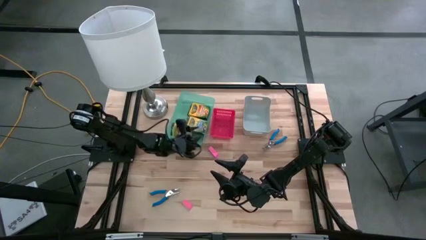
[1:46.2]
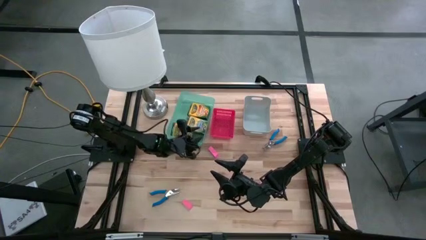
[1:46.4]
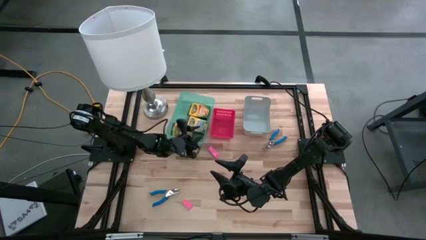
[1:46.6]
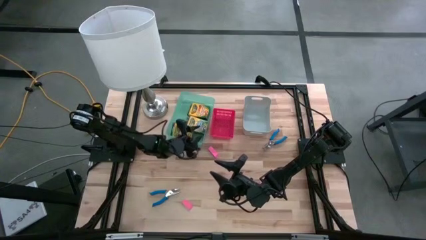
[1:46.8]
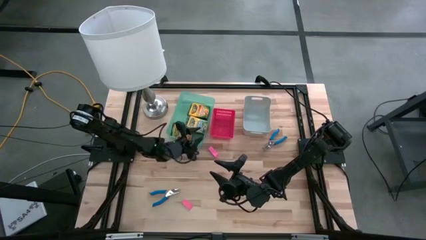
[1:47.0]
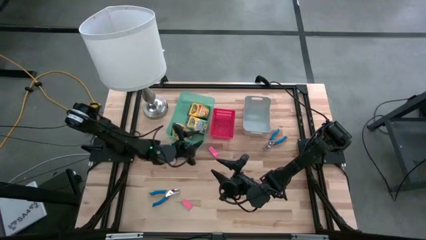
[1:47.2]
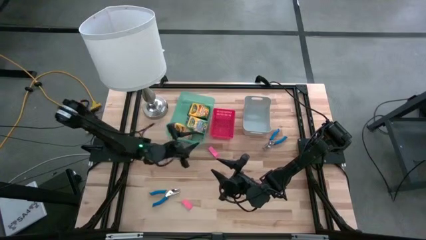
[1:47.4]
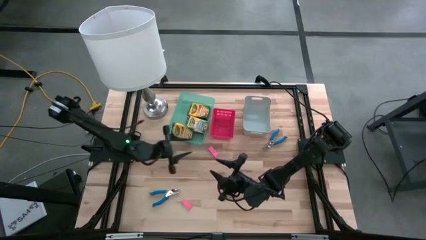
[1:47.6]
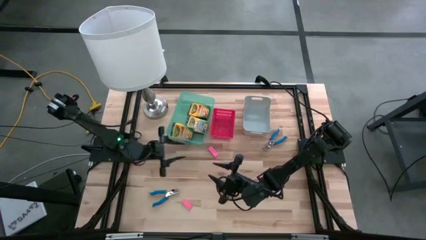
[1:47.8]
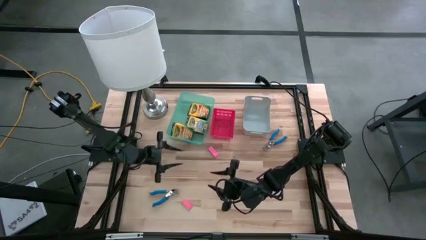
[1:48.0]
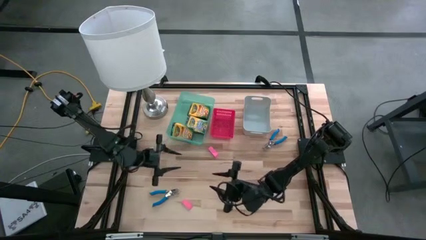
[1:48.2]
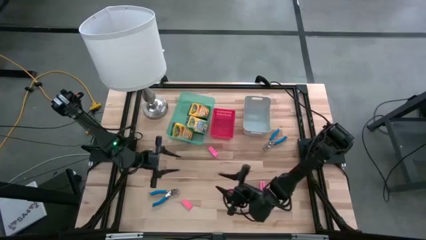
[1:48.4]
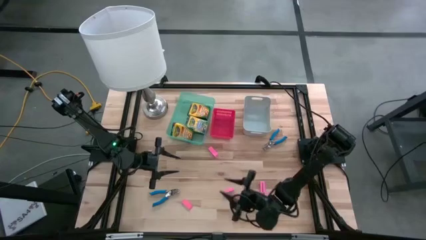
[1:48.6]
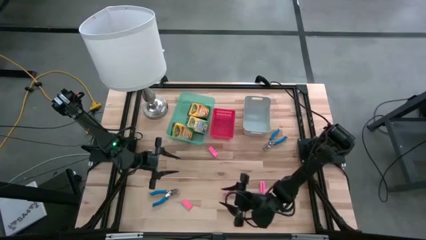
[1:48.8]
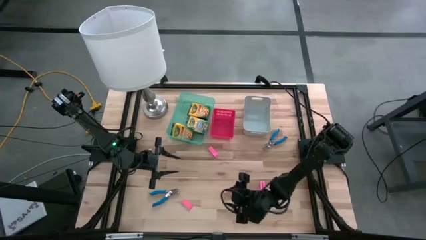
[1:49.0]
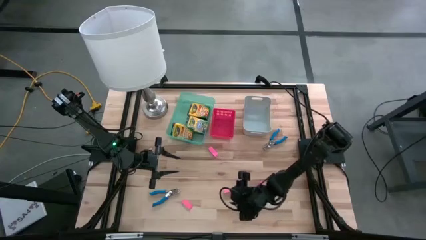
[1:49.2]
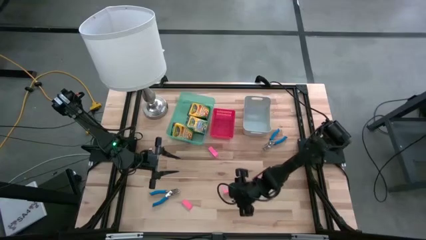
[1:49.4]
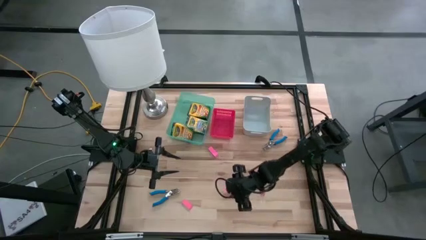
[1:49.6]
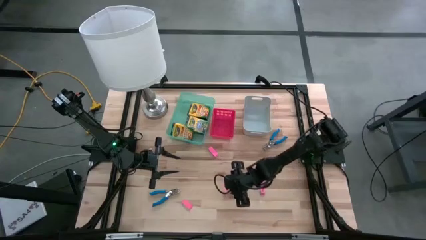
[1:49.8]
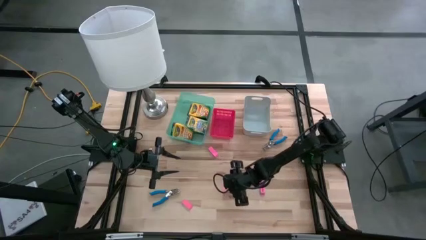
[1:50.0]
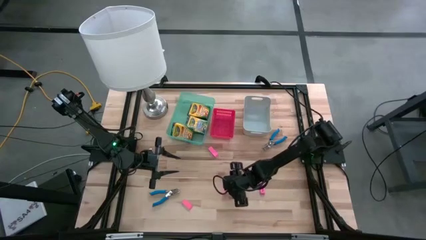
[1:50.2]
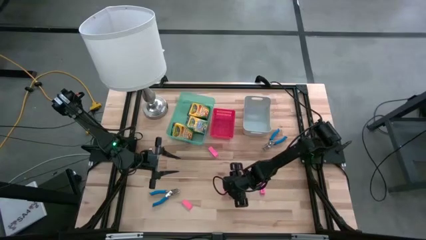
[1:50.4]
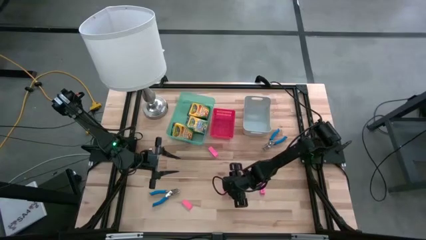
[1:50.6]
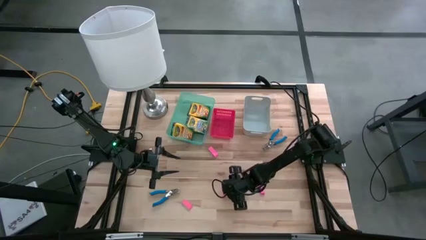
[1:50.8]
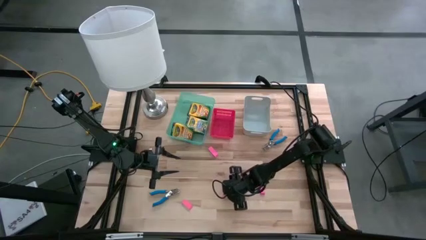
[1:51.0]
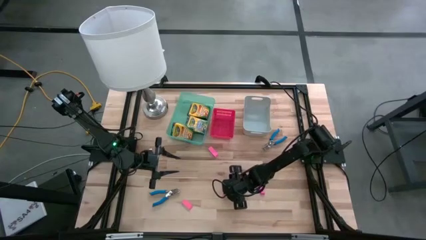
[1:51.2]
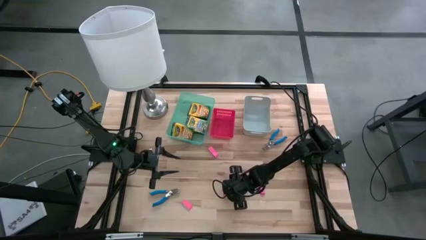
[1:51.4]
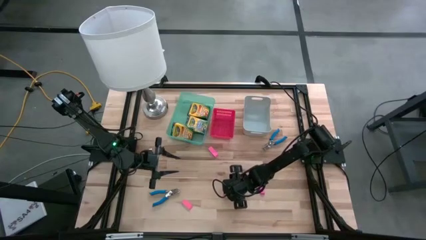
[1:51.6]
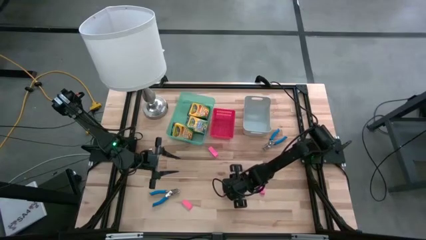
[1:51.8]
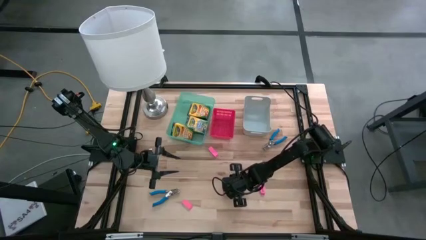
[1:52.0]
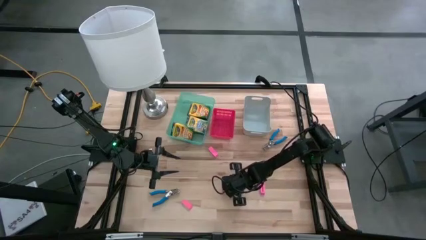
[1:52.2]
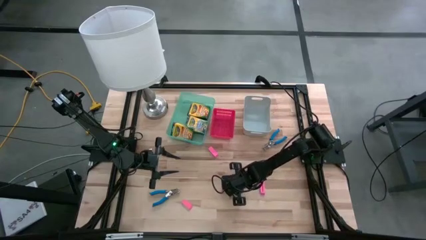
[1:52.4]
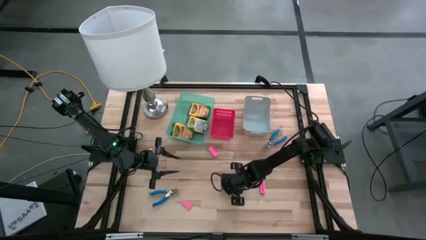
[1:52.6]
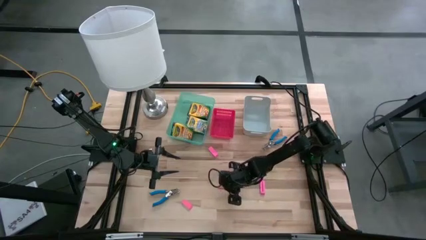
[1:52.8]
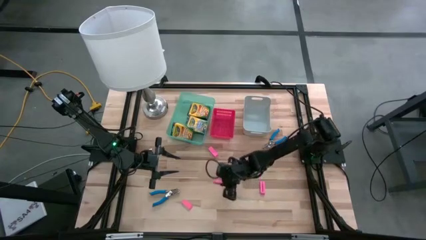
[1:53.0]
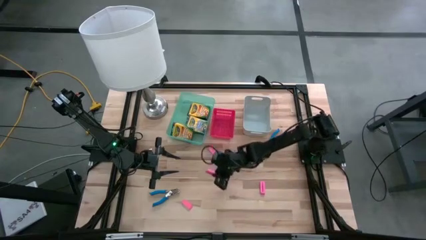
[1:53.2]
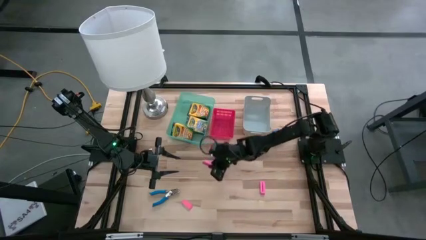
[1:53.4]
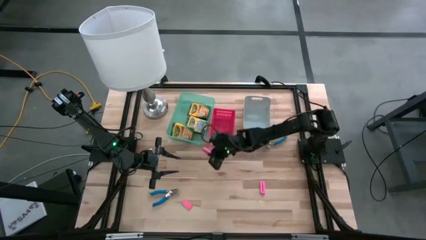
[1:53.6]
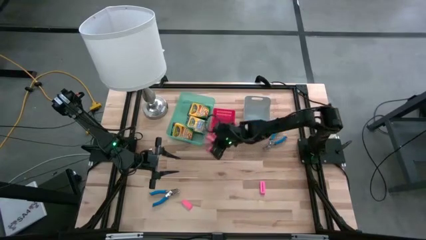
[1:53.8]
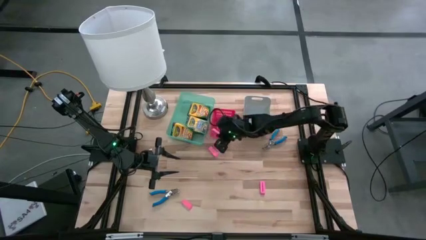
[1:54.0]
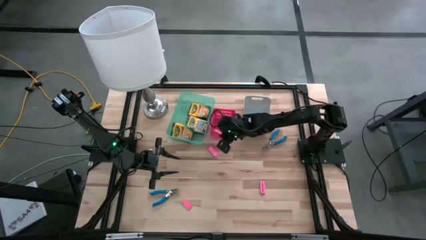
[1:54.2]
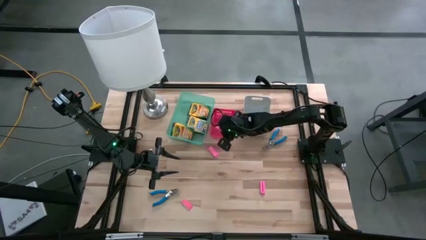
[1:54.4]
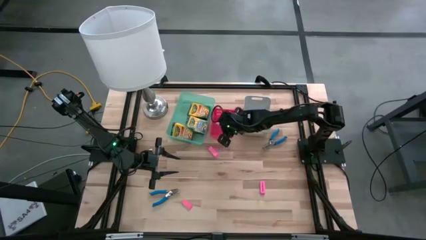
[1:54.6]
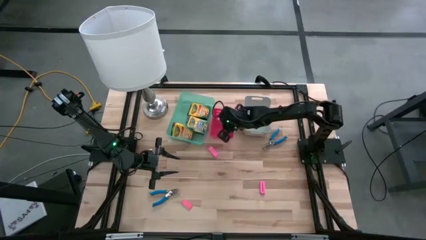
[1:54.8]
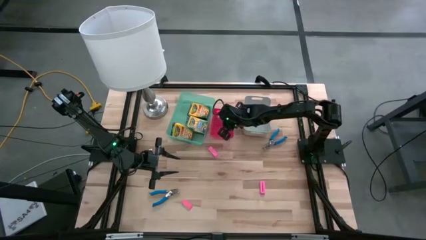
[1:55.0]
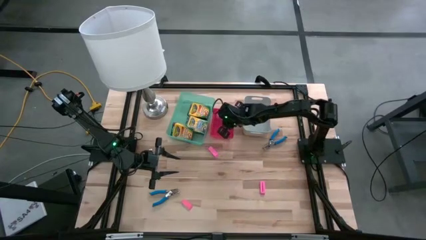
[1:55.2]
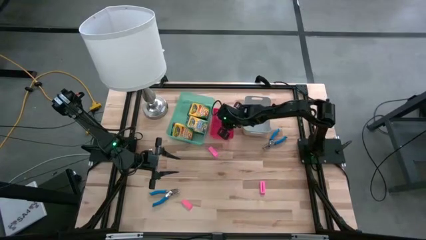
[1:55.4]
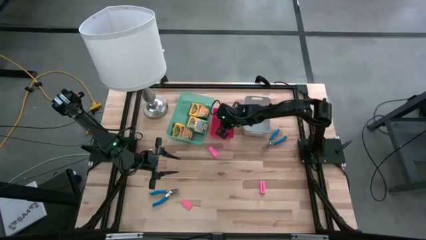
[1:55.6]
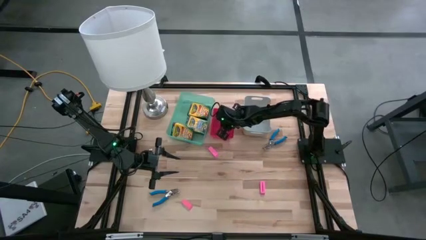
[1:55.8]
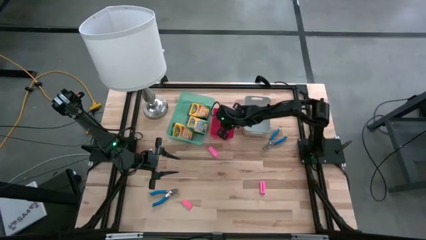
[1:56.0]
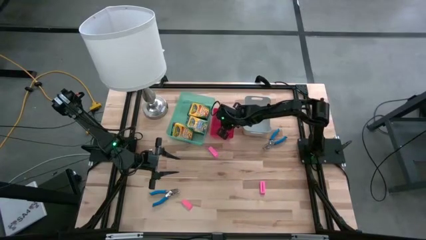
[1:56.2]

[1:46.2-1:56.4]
Task: Pick & Place School Supplies
Put the pink eraser into the red bin
